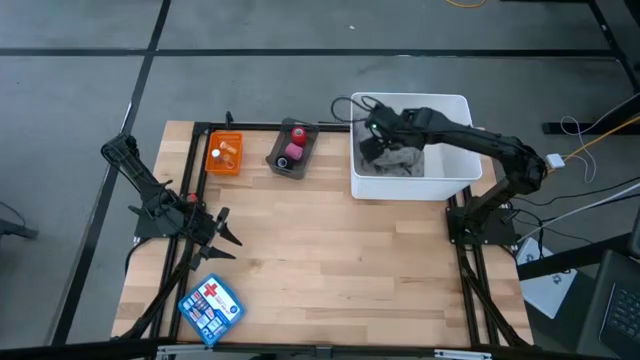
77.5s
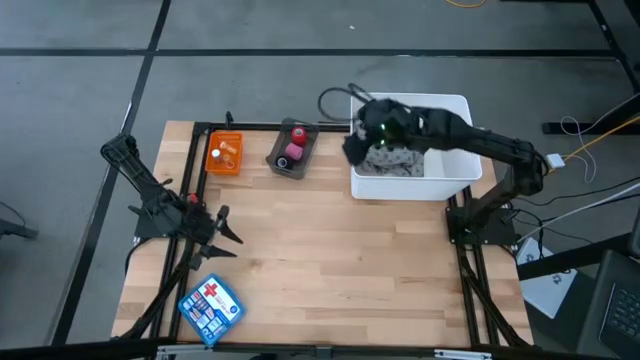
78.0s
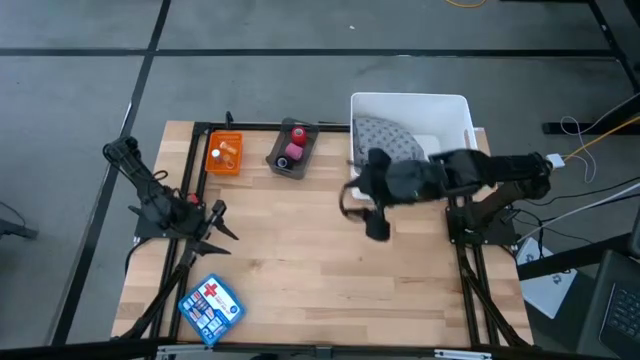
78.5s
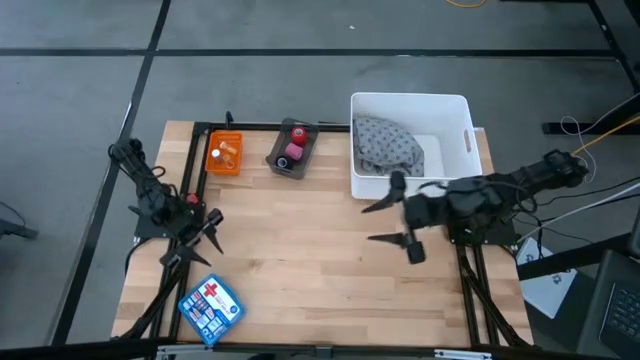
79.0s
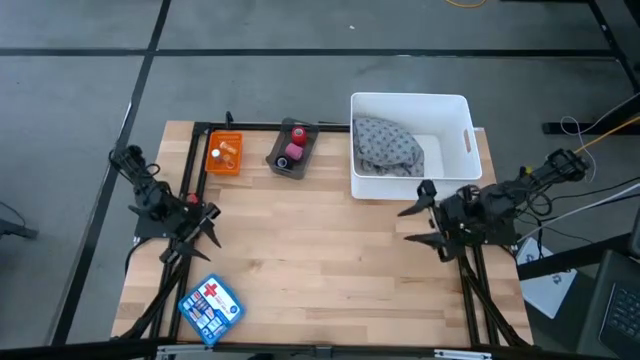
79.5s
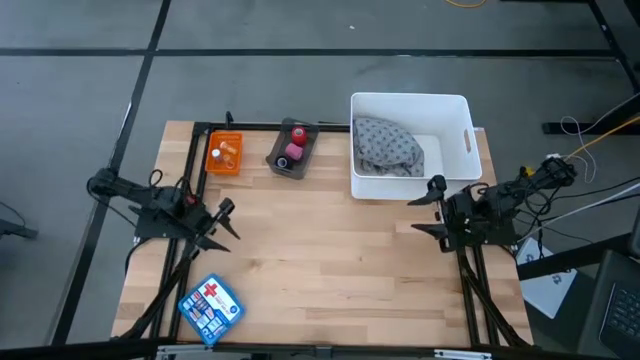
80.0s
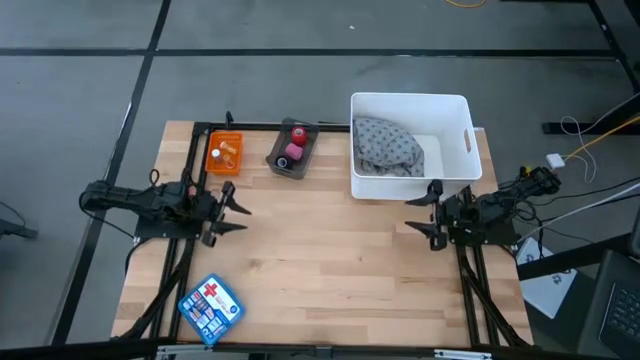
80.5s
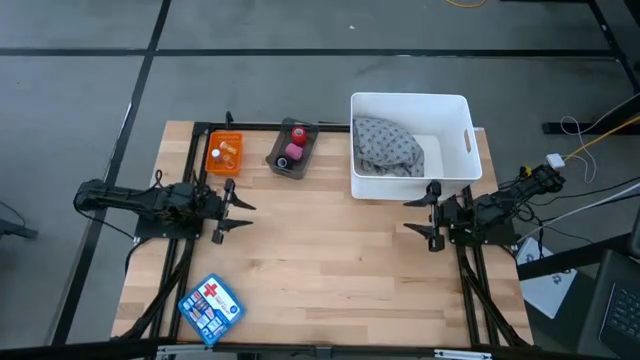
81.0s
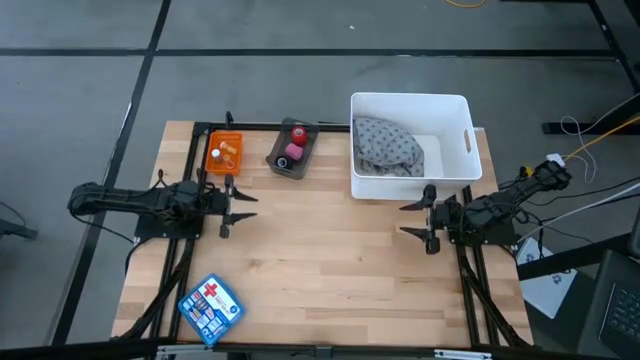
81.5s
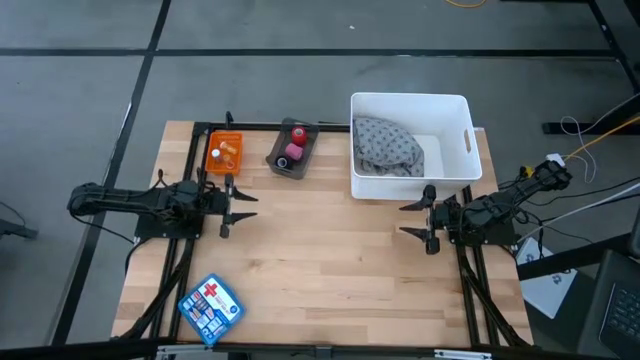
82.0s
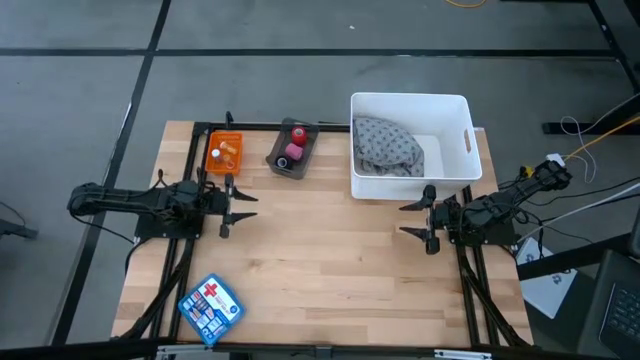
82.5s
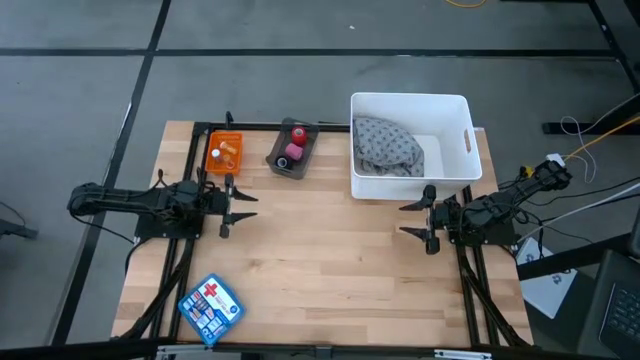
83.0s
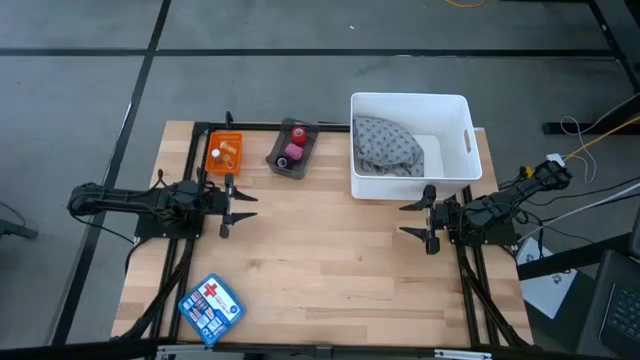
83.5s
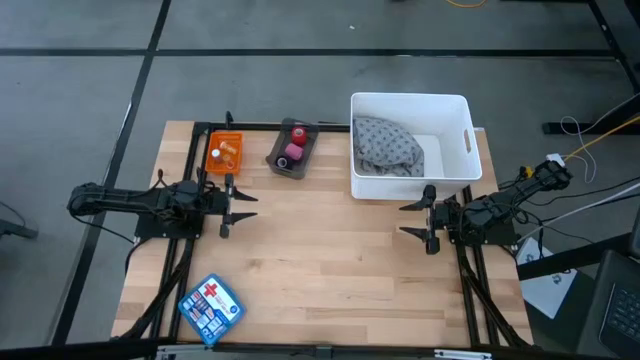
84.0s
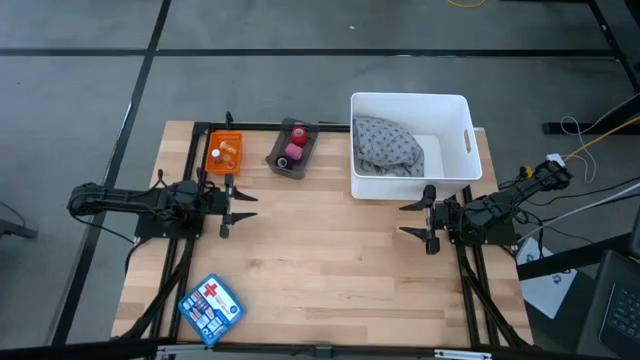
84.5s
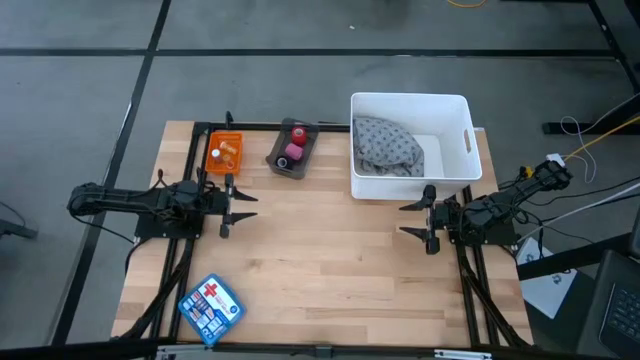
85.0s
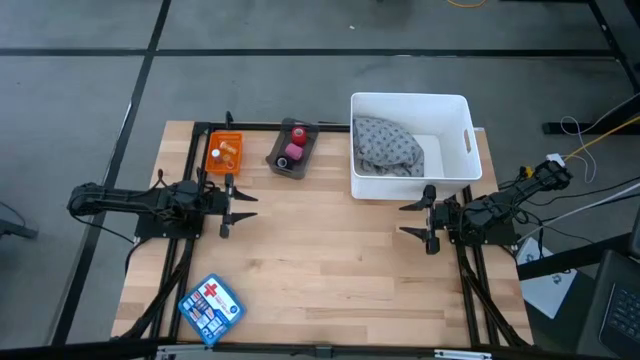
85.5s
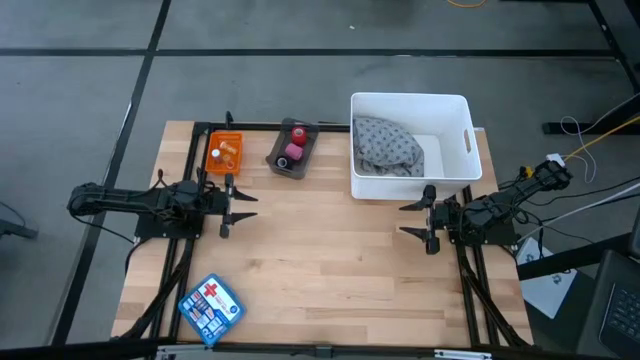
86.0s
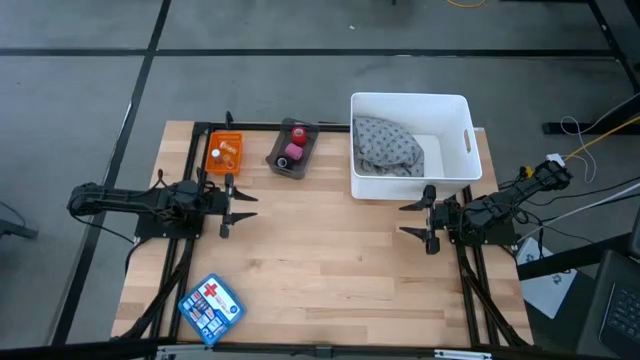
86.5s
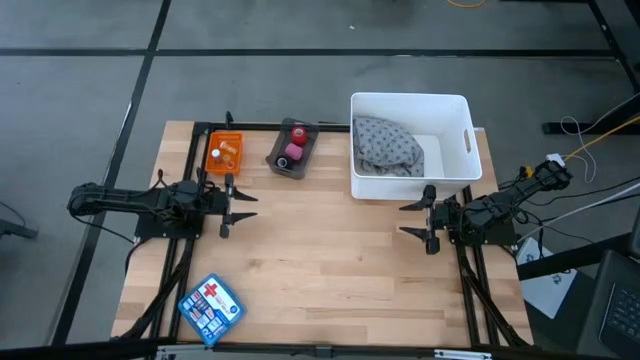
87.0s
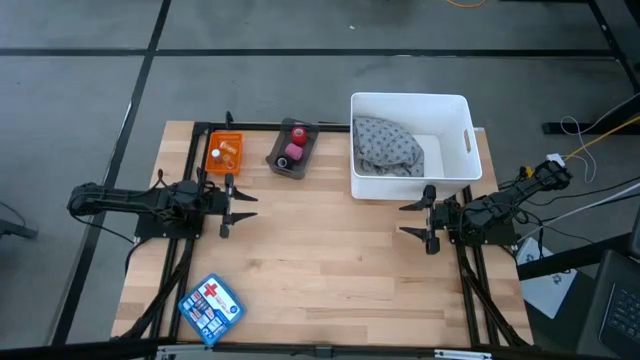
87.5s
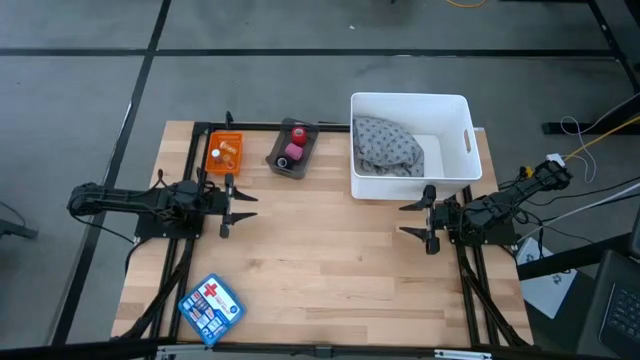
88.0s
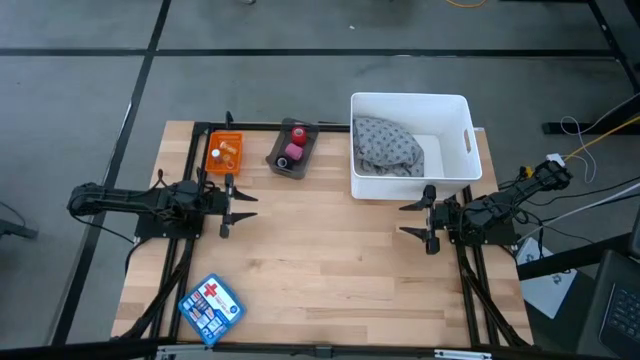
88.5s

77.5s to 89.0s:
Task: Pick & place medical supplies in basket/bin
Return to Home Position

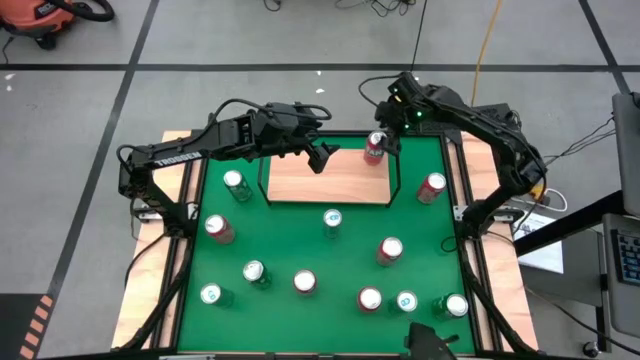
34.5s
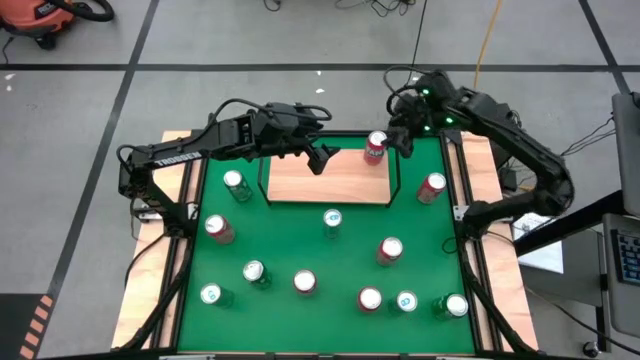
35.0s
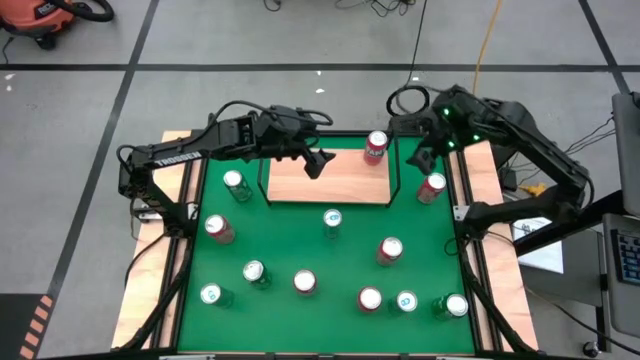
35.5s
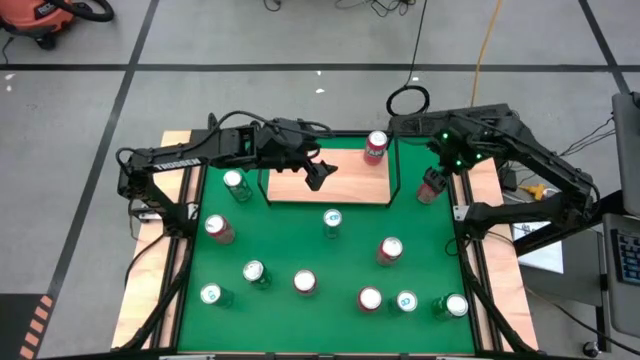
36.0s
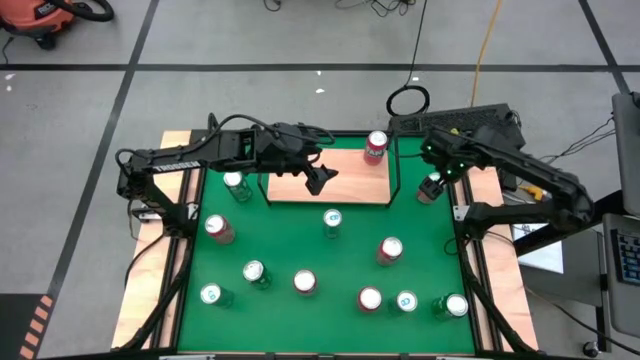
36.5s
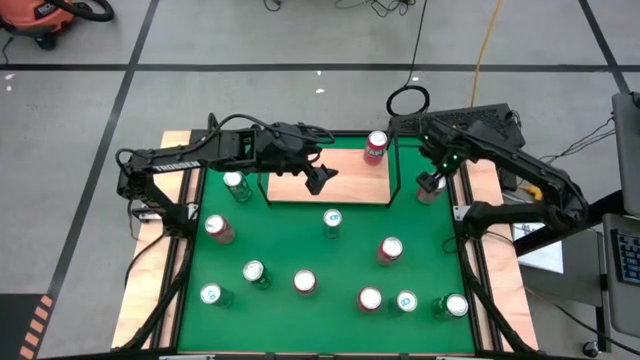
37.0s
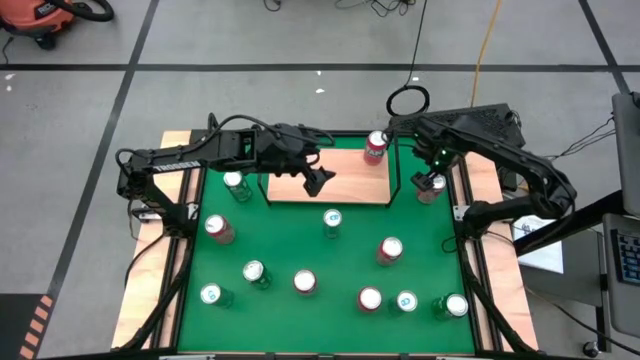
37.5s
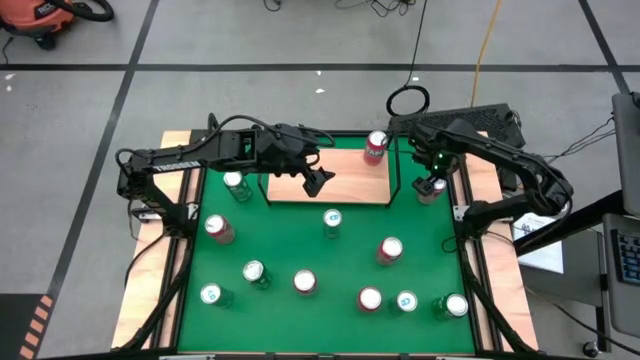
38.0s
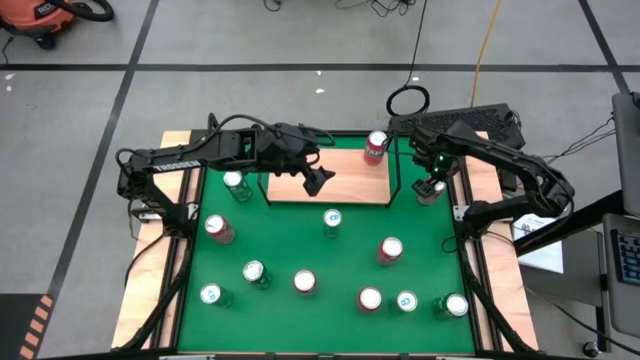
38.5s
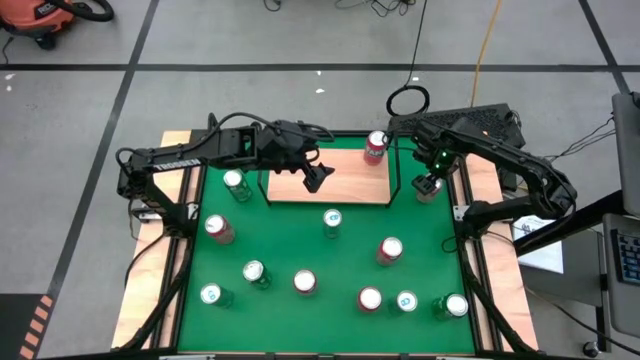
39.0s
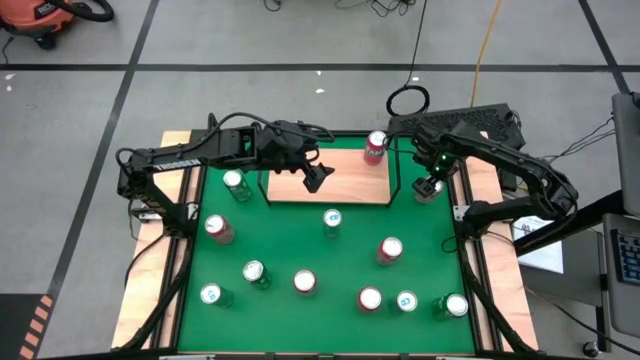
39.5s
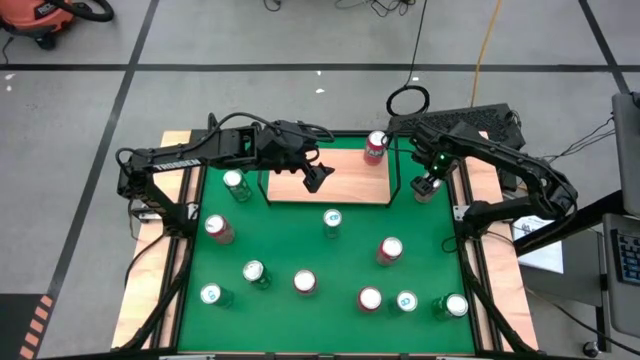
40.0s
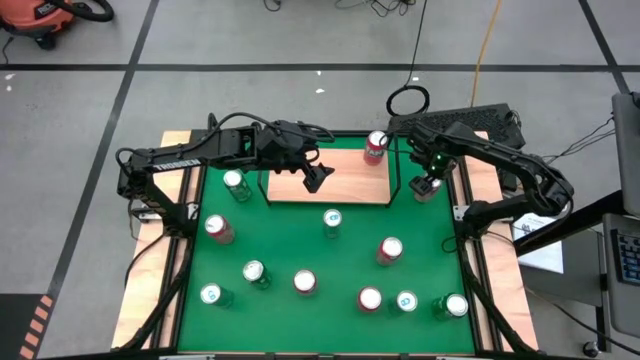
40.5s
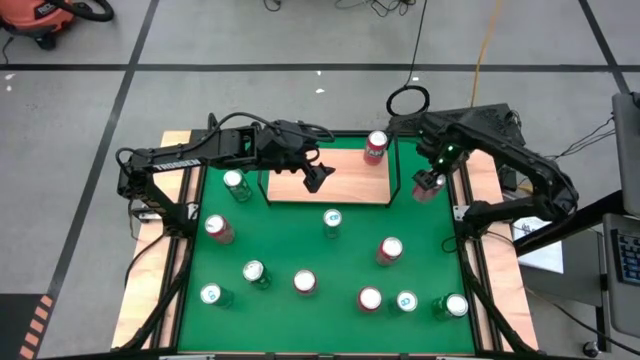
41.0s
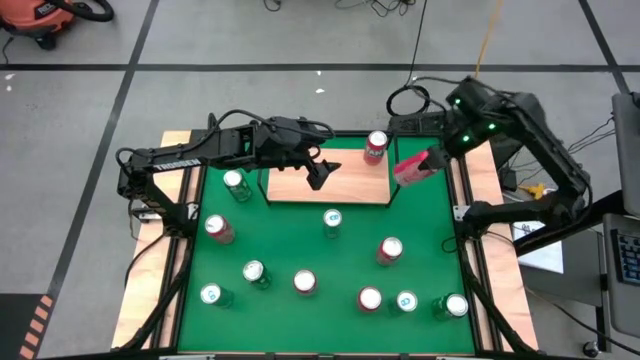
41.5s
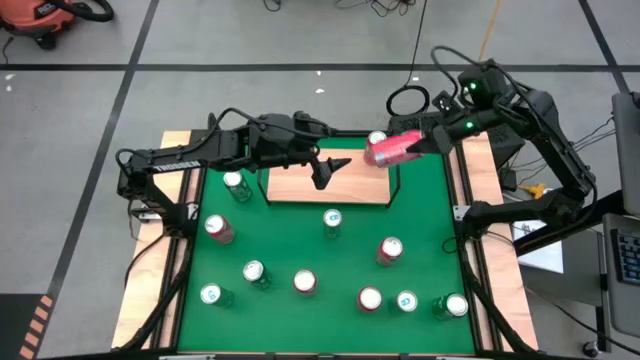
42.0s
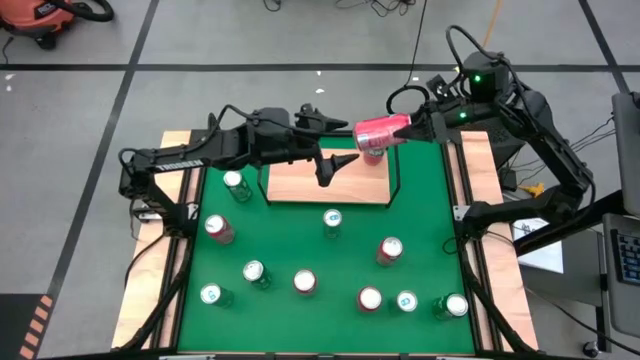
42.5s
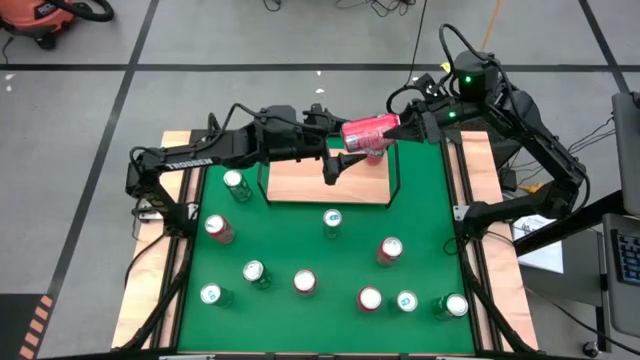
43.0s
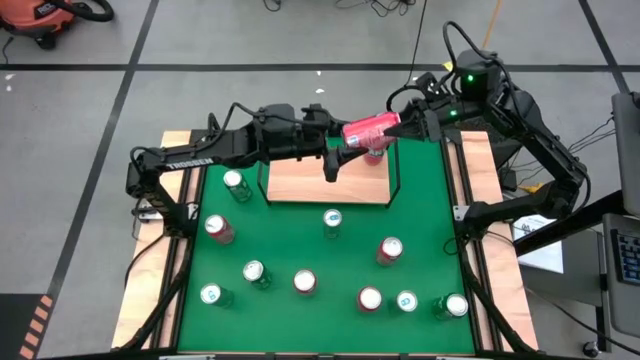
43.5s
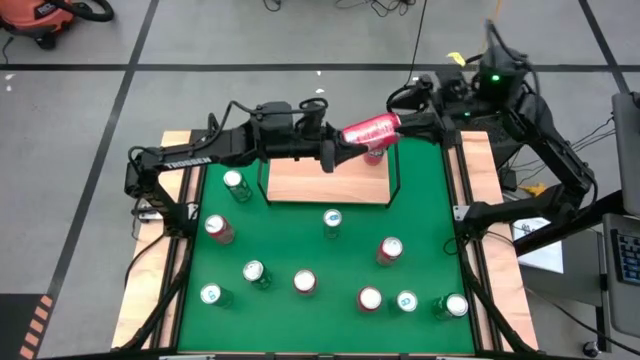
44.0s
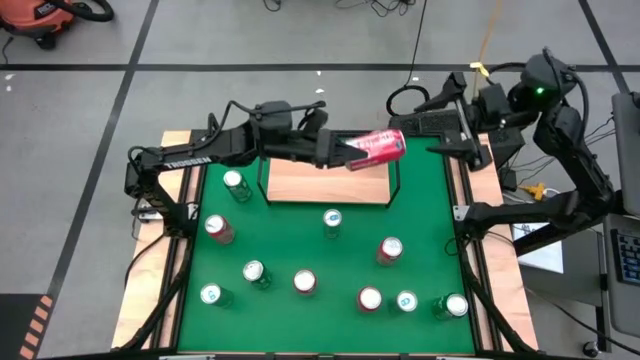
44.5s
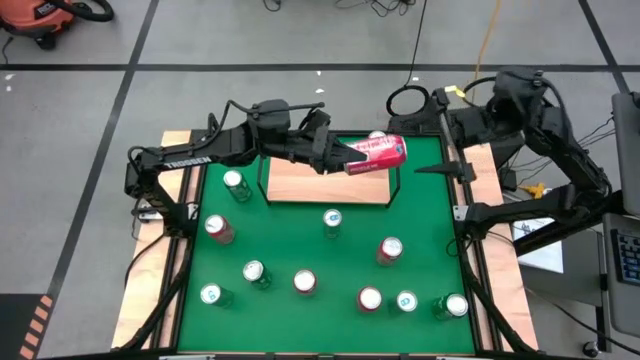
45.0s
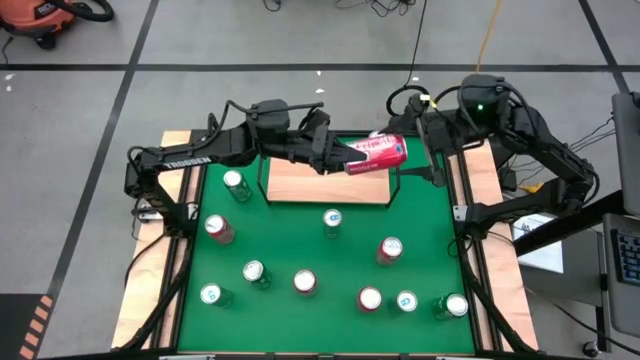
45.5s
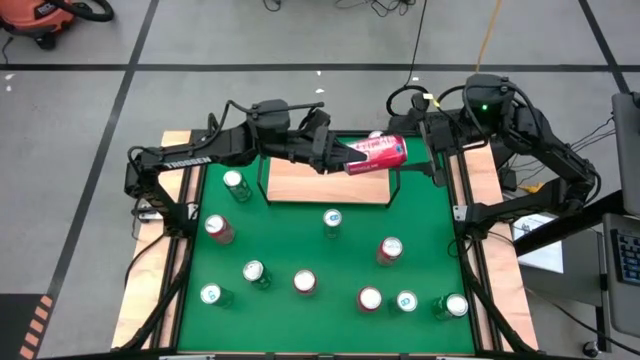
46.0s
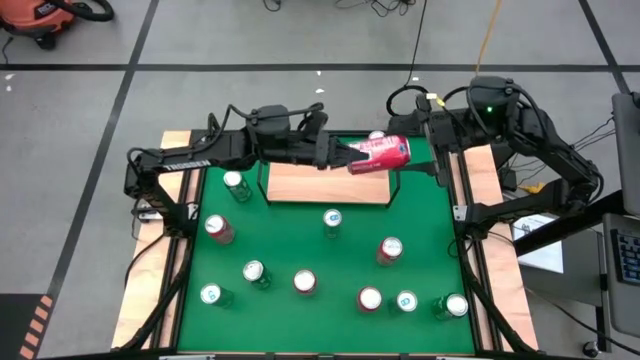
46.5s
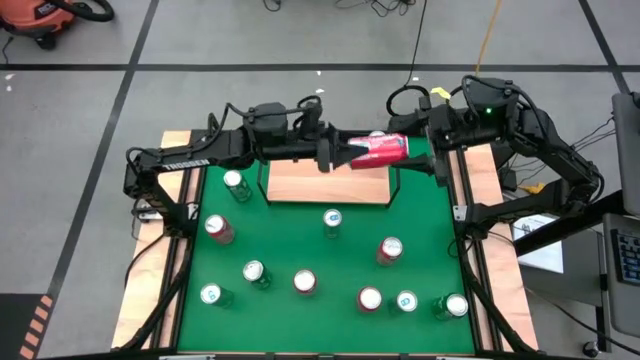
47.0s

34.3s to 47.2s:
Task: Place canned beverage on shelf
Put the red soda can on the shelf
